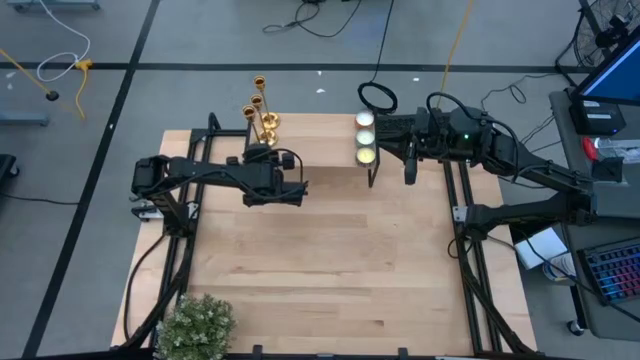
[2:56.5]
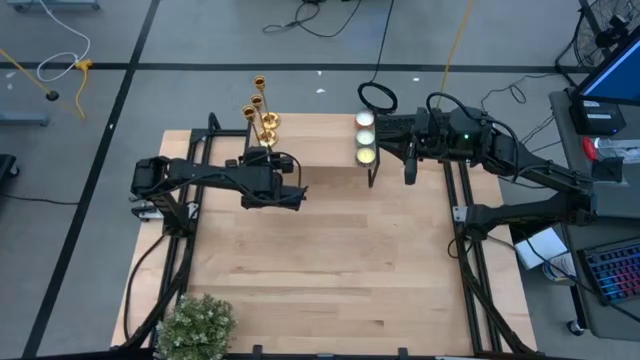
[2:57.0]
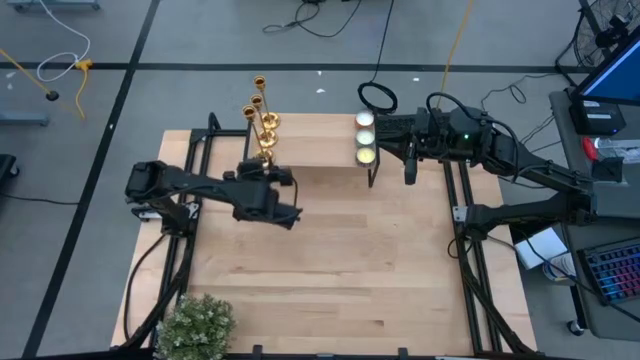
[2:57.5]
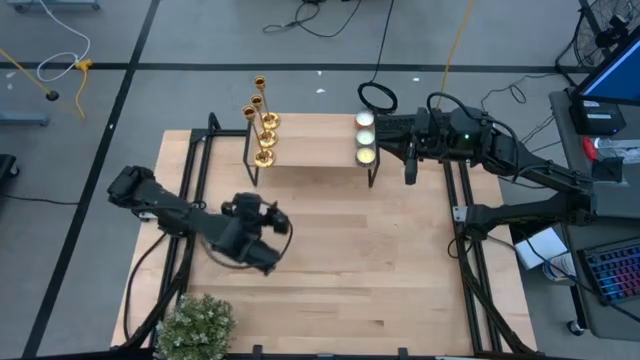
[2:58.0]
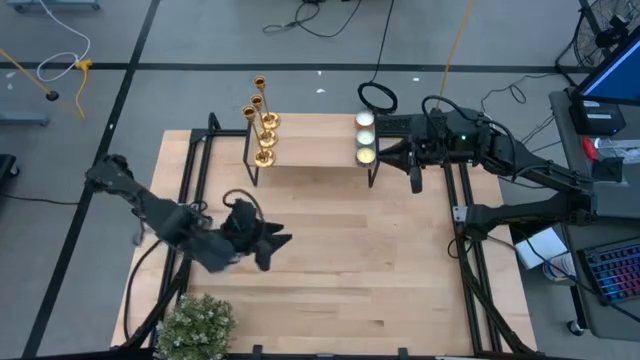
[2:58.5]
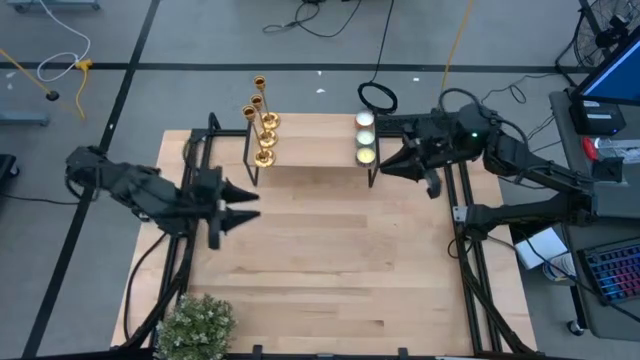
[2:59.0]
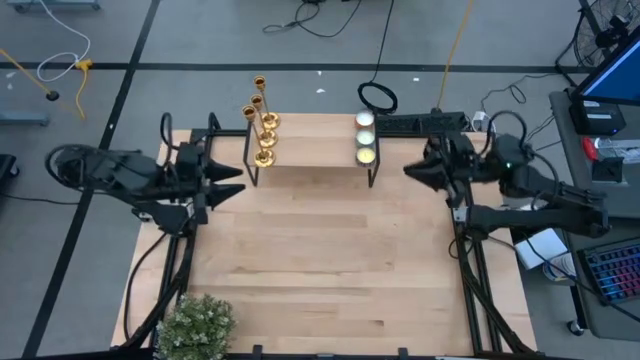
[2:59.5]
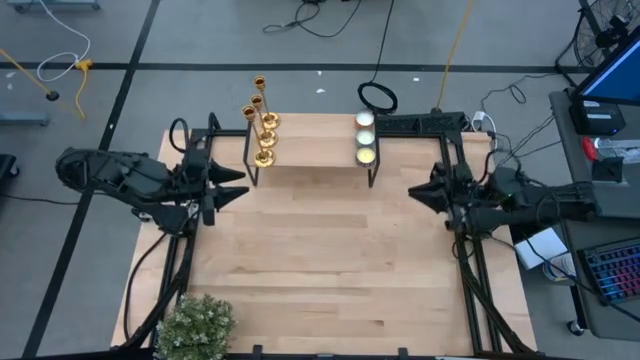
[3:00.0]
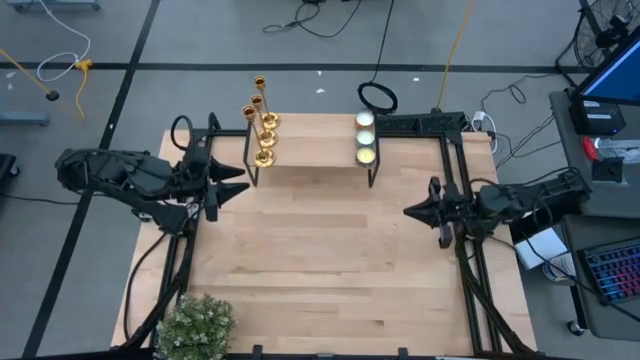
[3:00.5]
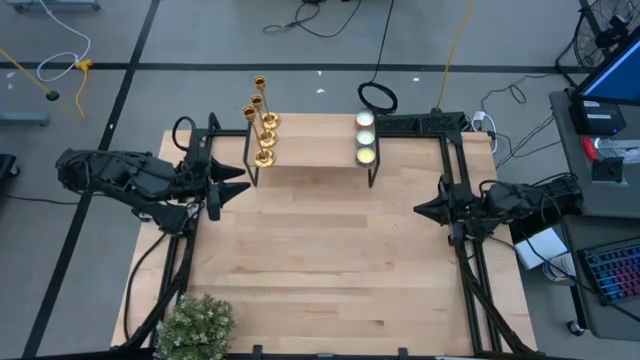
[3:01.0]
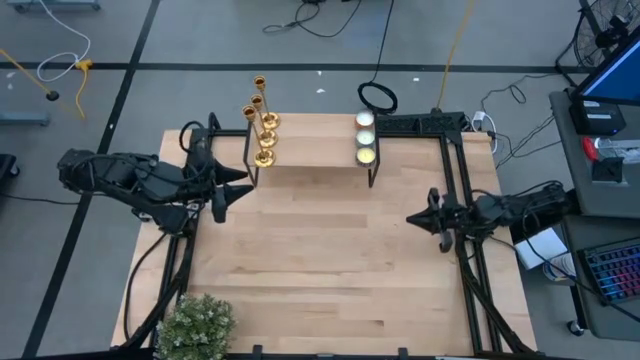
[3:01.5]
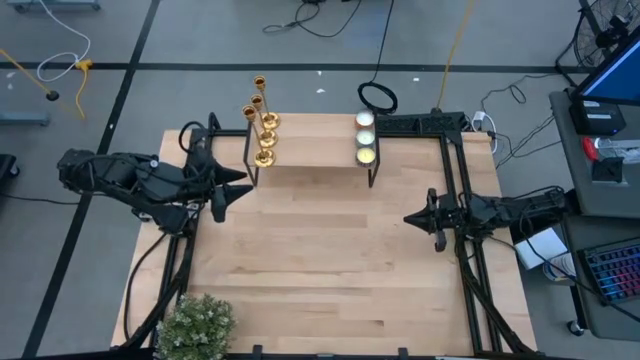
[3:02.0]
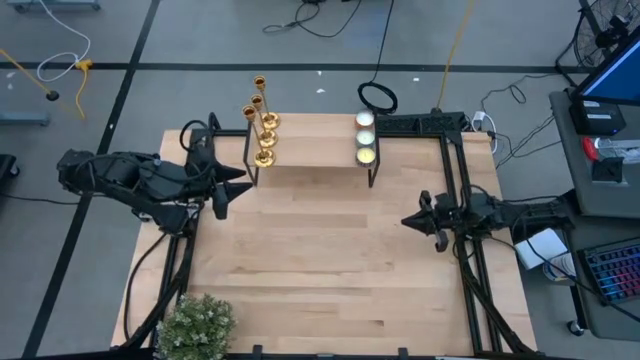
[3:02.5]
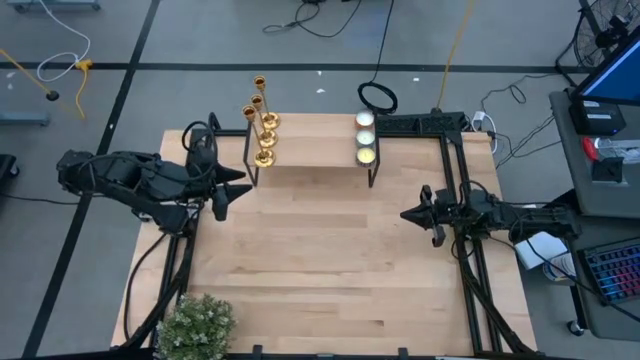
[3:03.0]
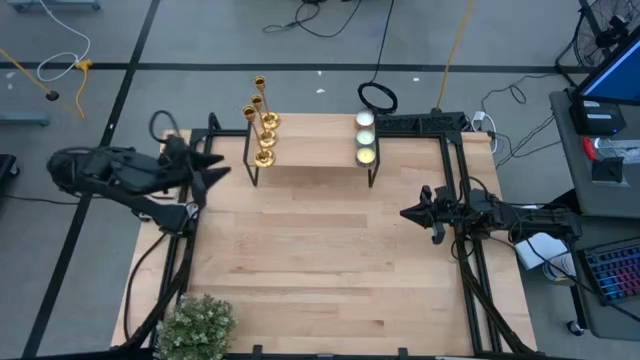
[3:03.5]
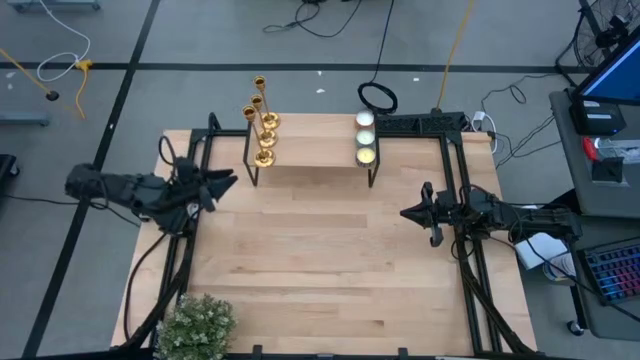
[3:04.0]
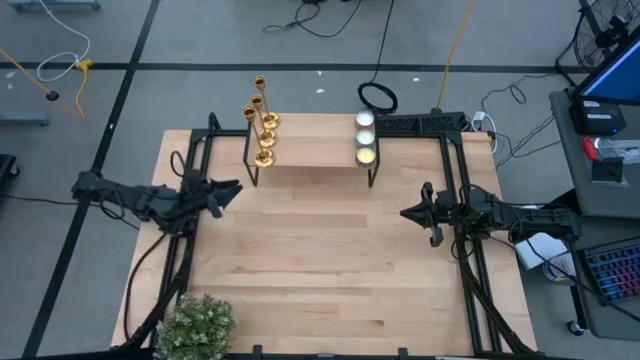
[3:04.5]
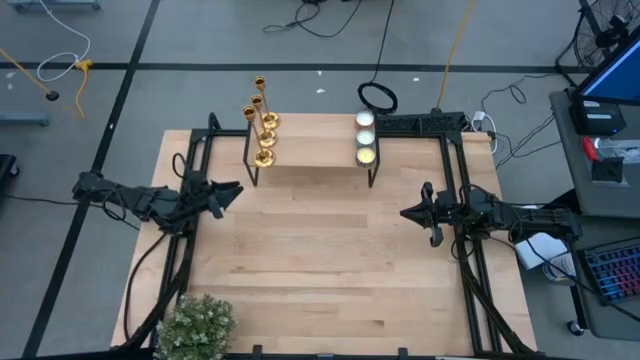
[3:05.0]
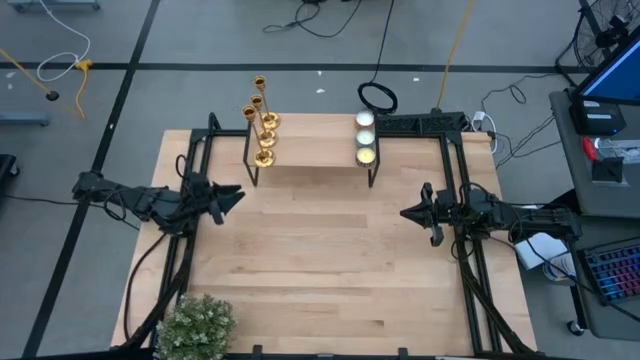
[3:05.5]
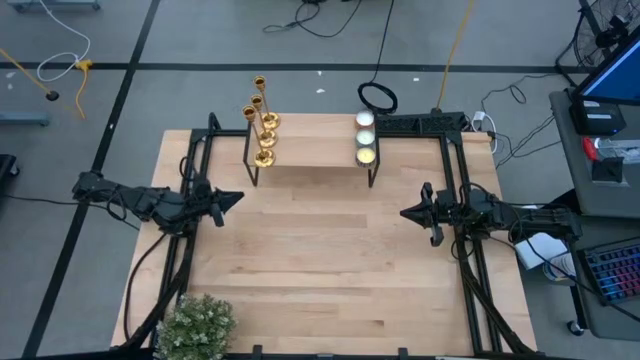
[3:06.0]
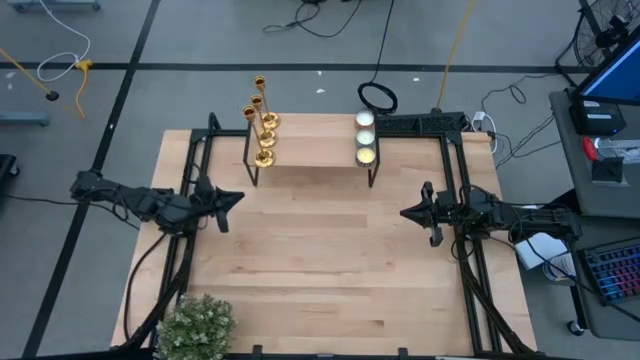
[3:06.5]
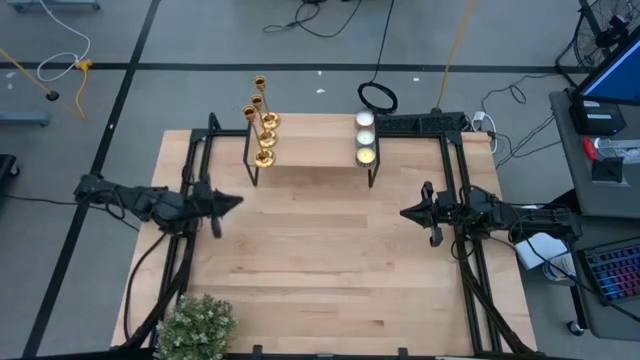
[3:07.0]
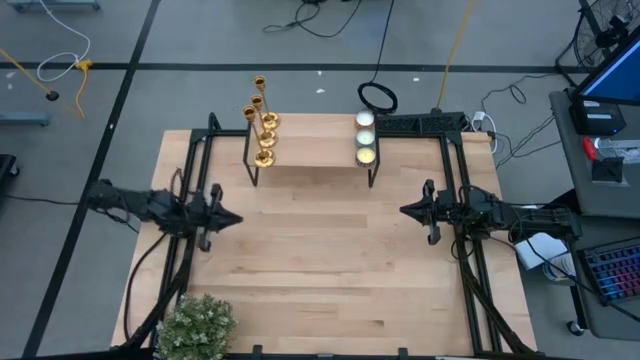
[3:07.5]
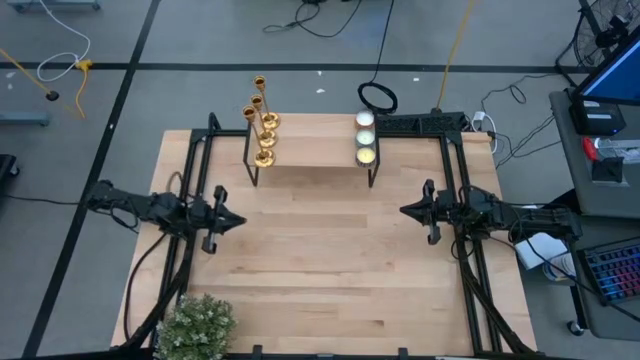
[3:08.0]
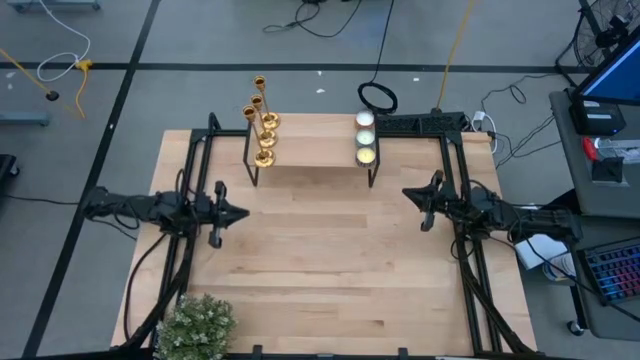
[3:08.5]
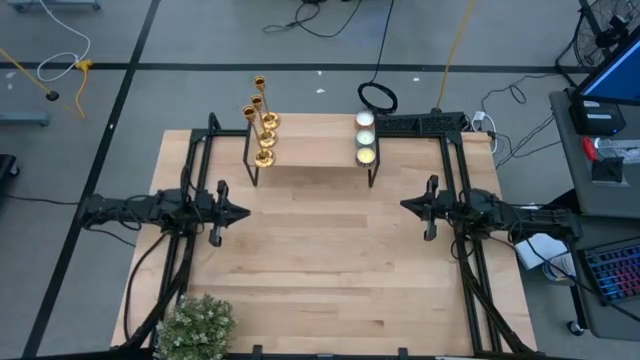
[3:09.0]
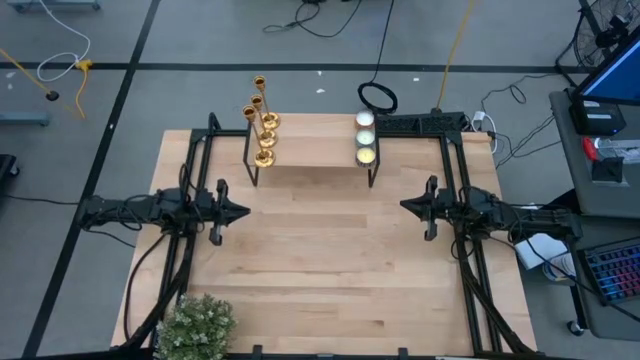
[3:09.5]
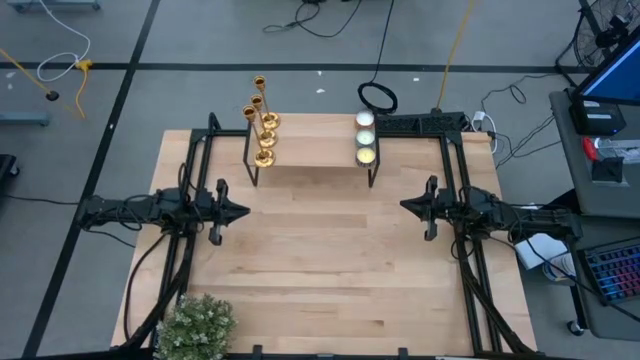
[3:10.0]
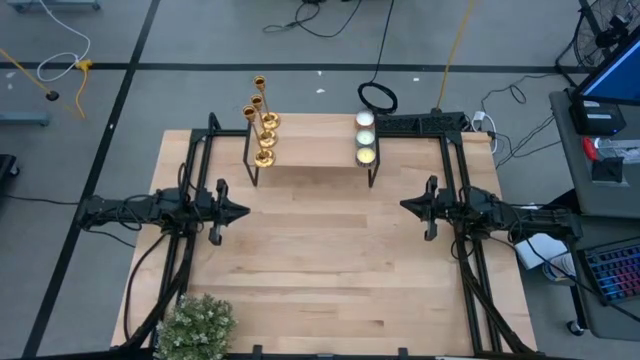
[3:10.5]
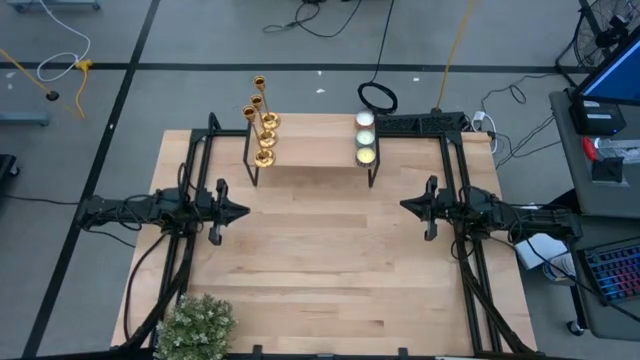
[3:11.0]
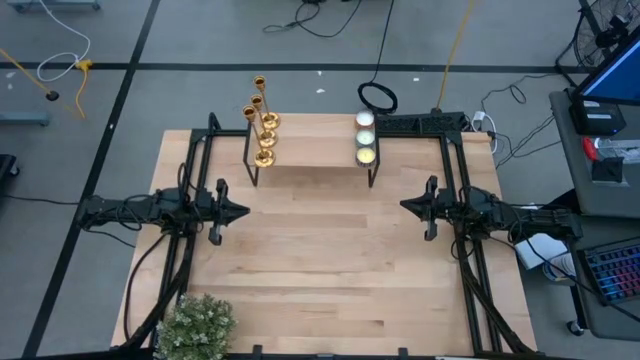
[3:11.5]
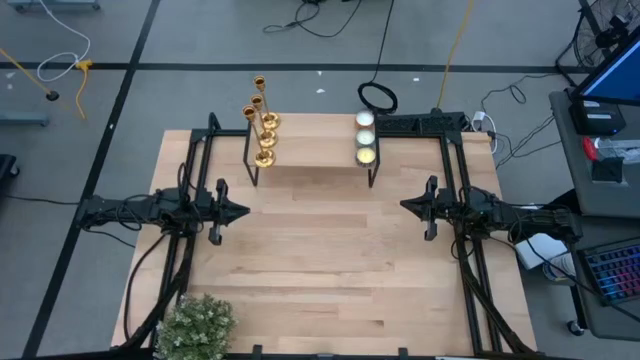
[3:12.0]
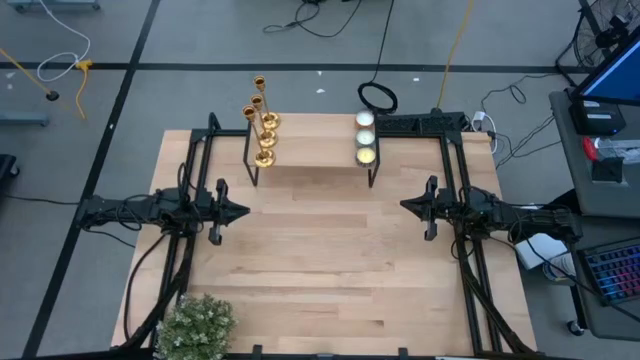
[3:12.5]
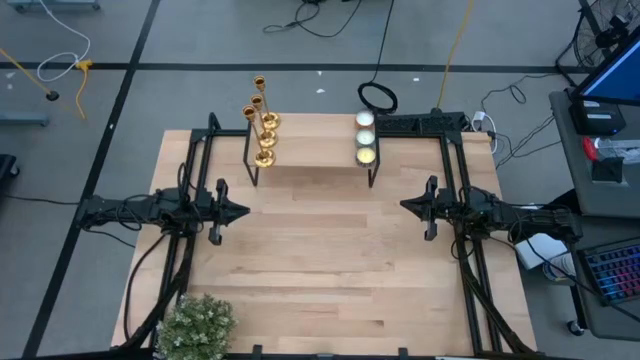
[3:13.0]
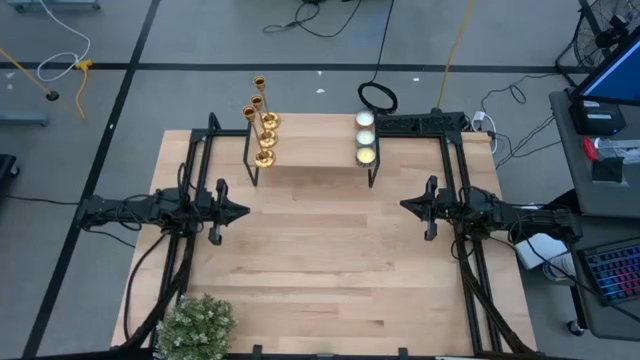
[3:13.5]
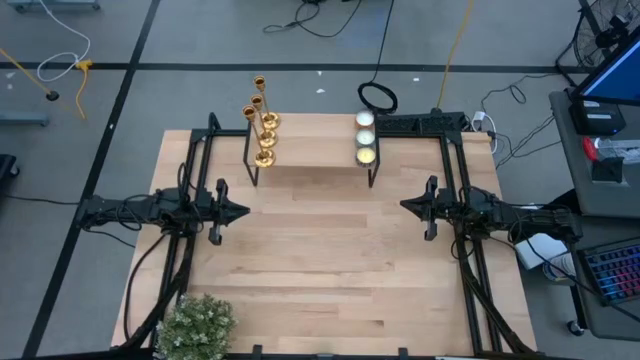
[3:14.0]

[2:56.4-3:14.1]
Task: Pick & Place candle stick holders
Return to Home Position

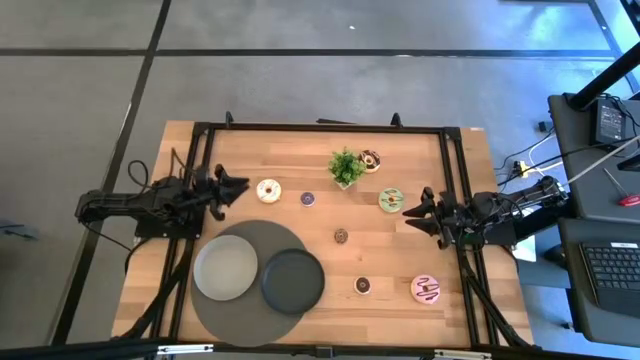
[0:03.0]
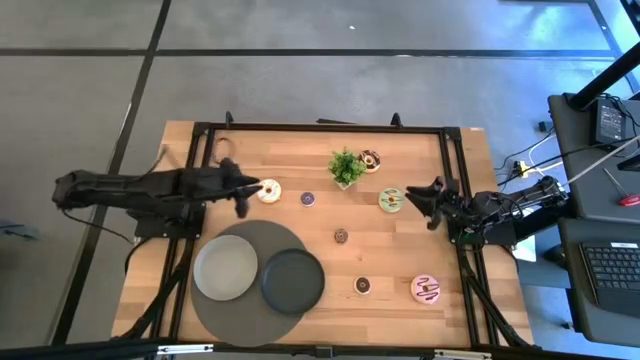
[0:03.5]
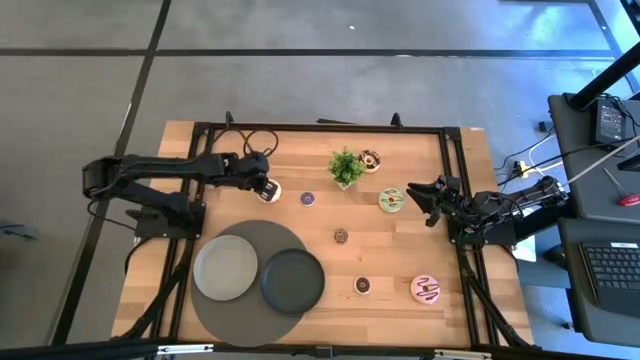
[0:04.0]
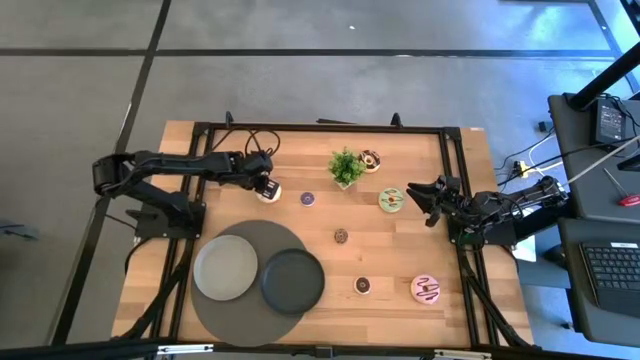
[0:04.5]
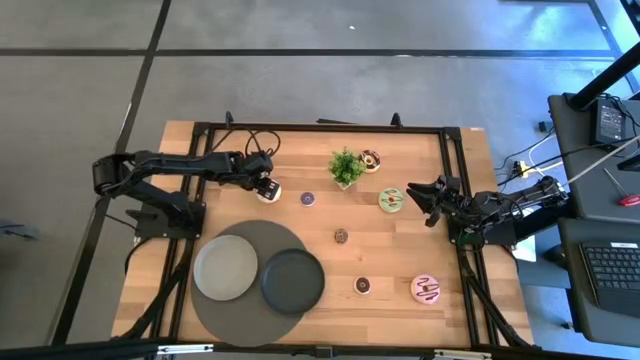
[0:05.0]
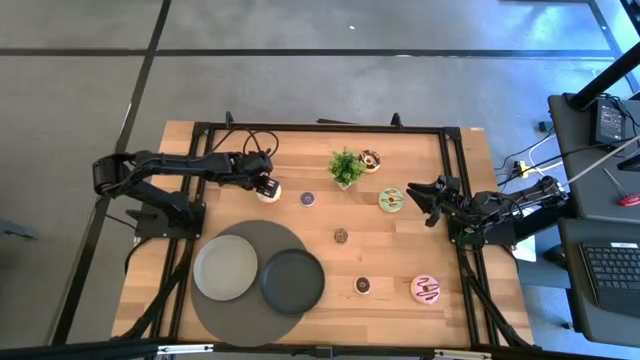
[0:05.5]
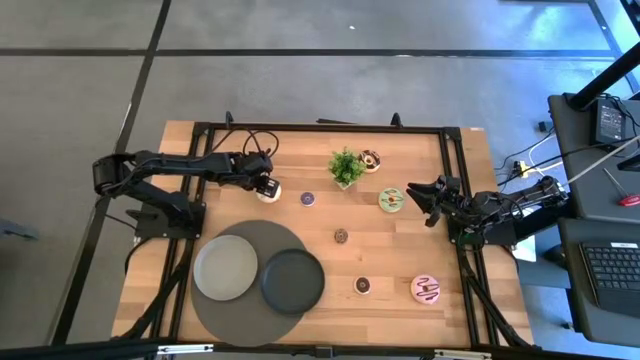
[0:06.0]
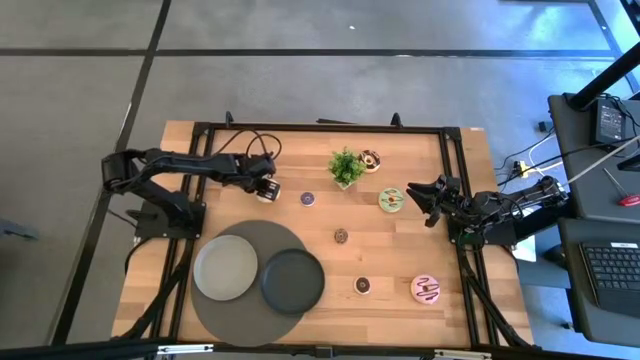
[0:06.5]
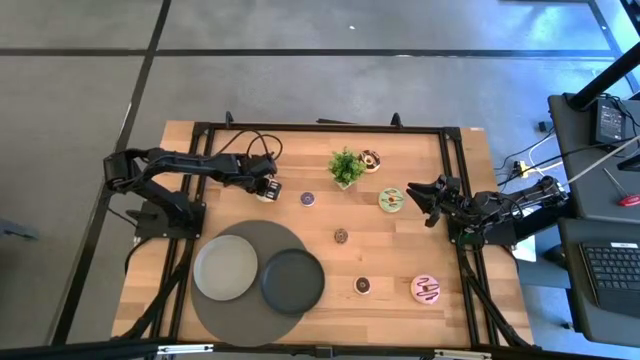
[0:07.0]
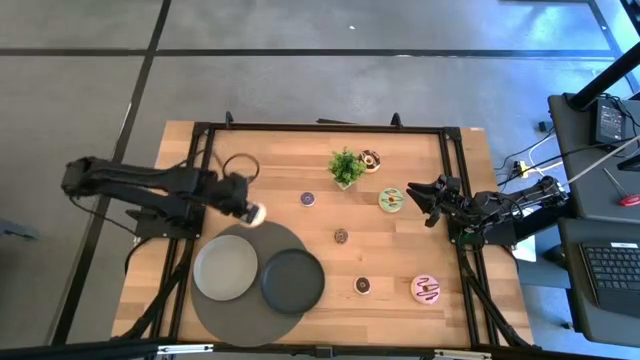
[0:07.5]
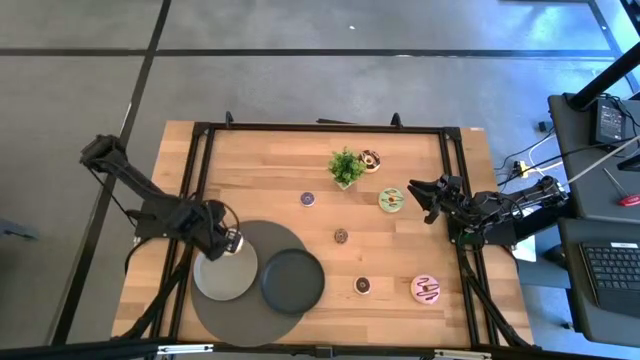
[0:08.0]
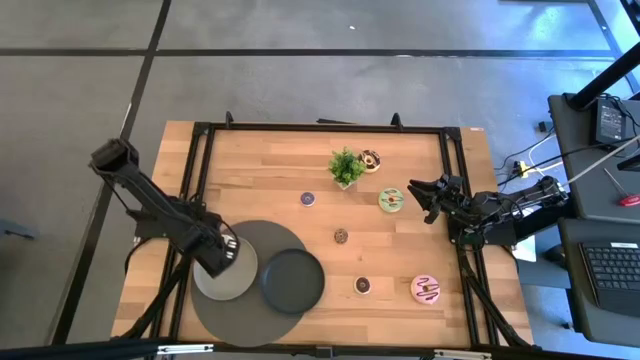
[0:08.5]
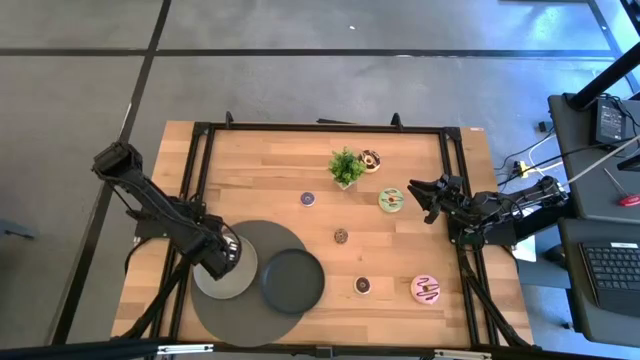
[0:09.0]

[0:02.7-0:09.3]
Task: Pick & Place donuts
Put the big white donut on the gray plate
